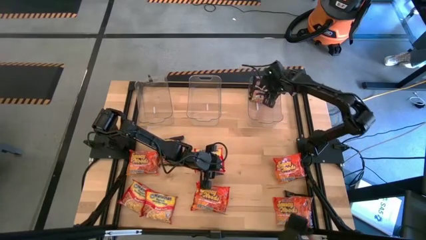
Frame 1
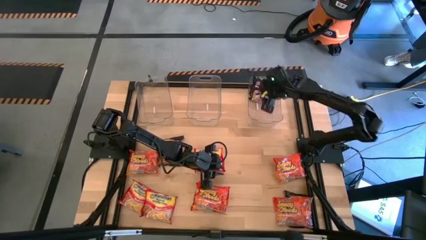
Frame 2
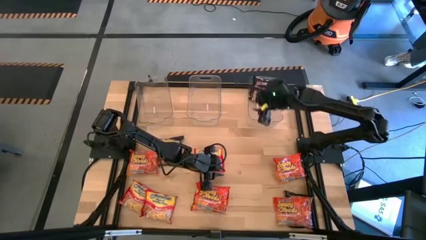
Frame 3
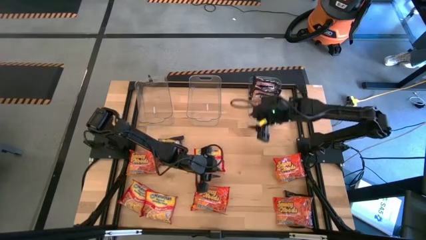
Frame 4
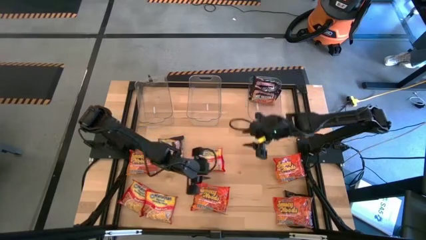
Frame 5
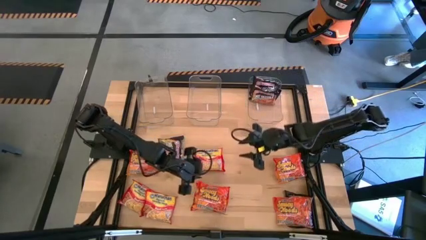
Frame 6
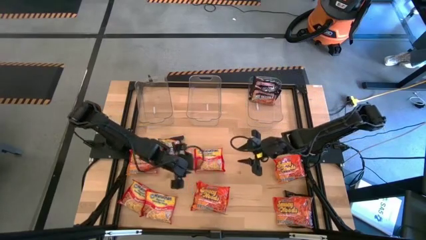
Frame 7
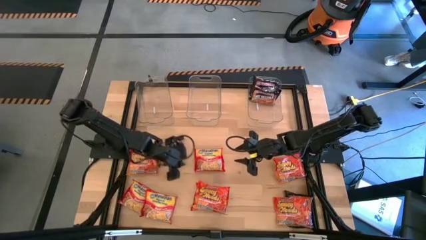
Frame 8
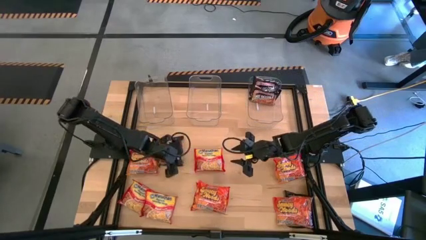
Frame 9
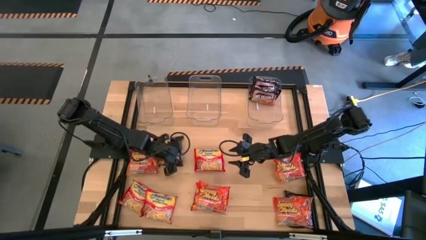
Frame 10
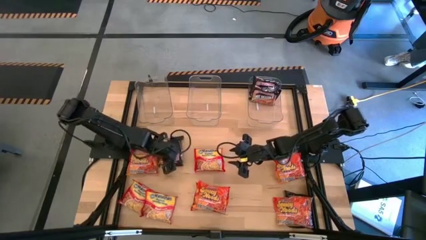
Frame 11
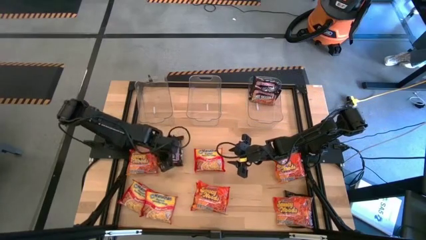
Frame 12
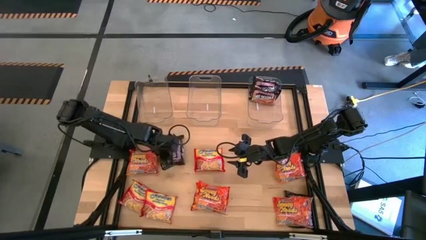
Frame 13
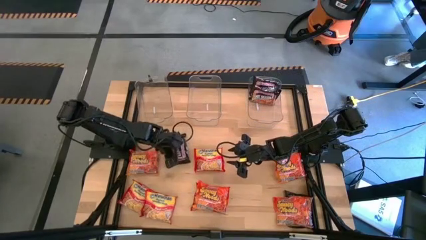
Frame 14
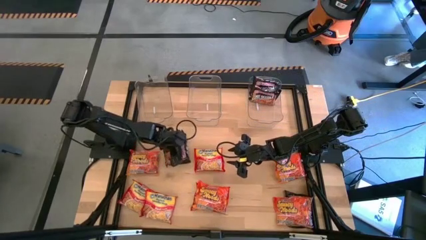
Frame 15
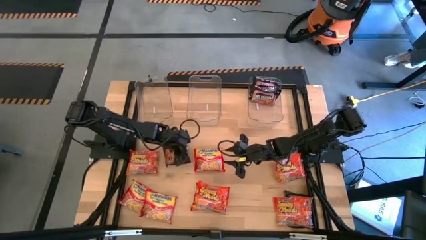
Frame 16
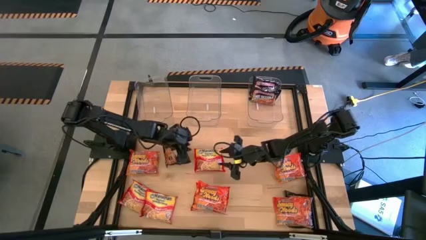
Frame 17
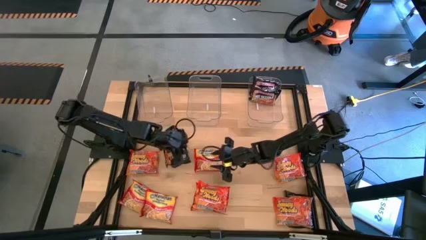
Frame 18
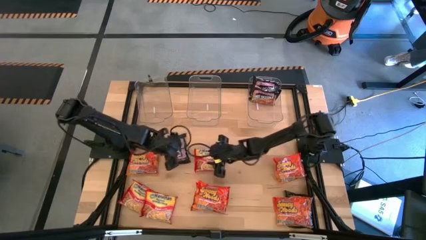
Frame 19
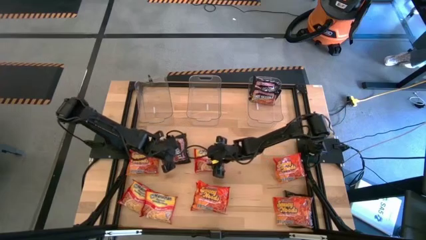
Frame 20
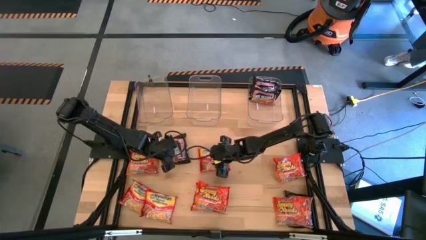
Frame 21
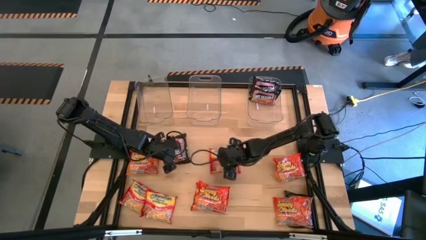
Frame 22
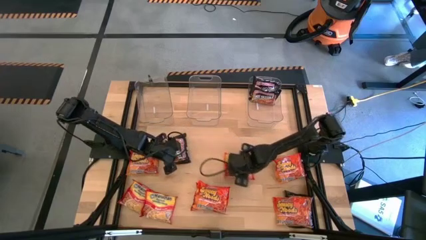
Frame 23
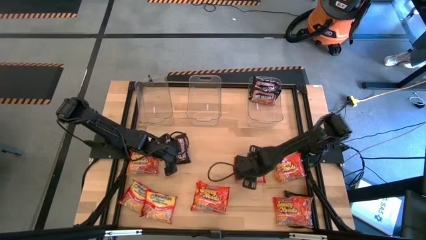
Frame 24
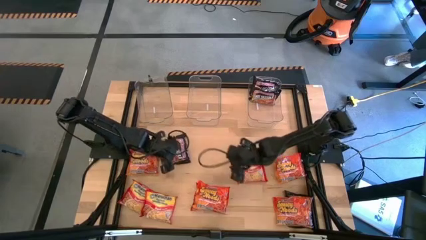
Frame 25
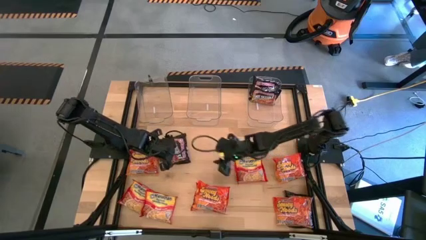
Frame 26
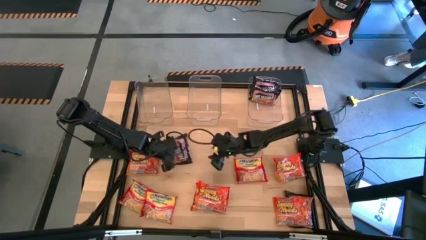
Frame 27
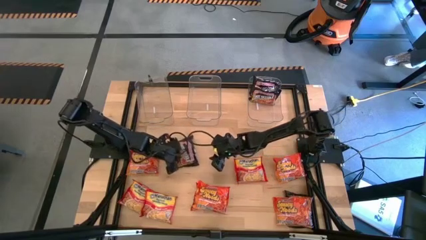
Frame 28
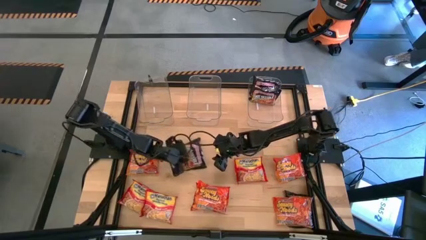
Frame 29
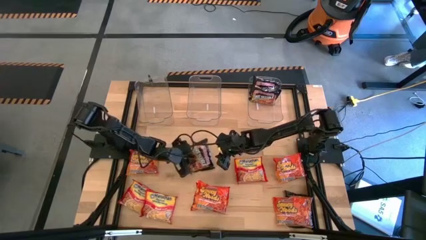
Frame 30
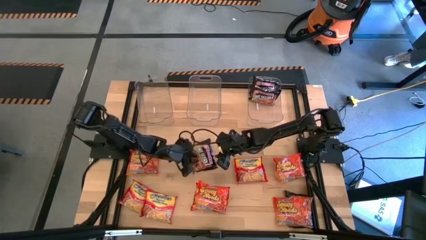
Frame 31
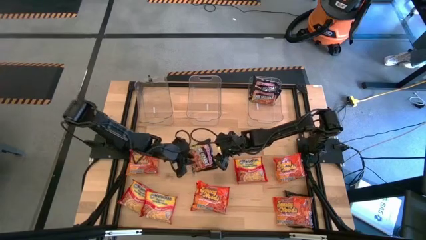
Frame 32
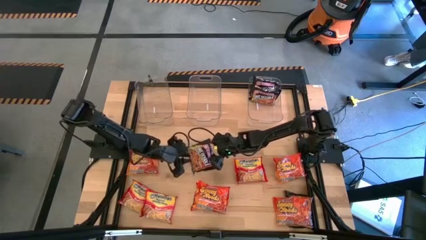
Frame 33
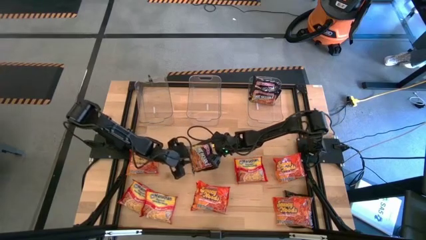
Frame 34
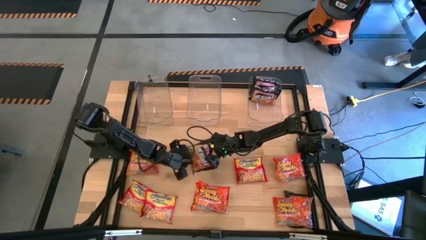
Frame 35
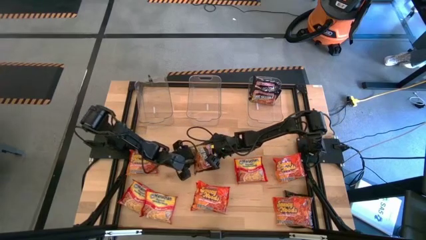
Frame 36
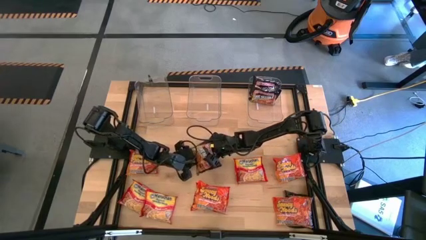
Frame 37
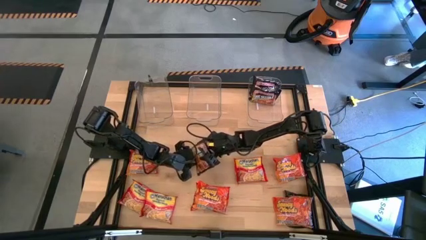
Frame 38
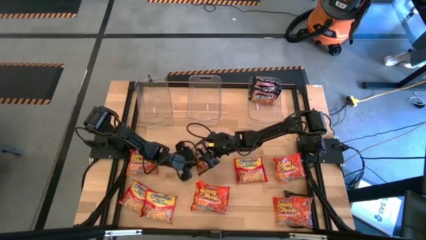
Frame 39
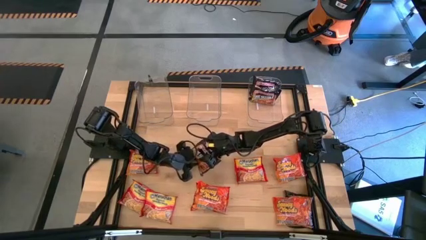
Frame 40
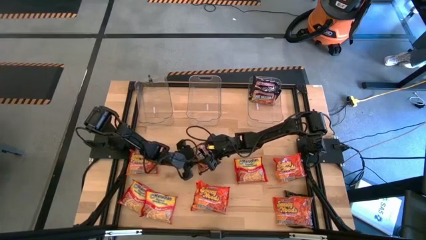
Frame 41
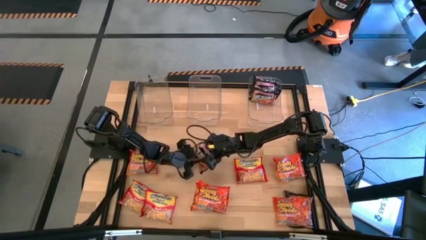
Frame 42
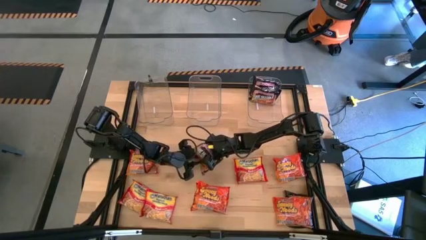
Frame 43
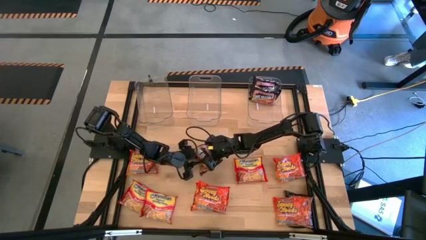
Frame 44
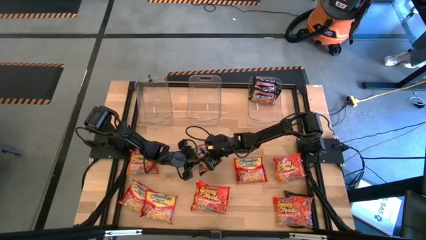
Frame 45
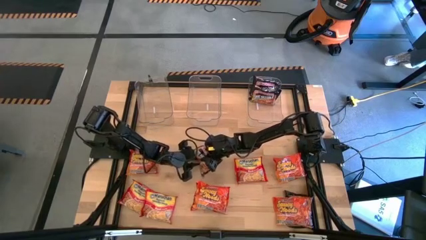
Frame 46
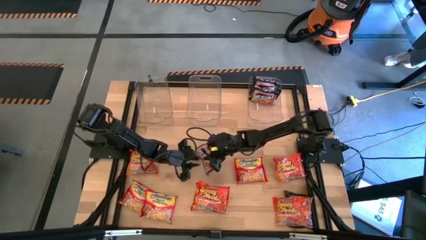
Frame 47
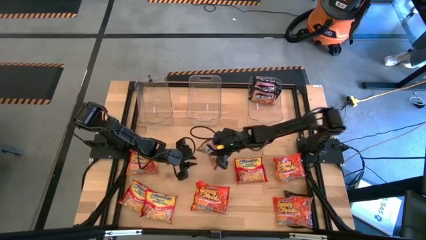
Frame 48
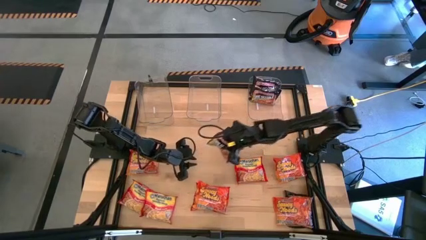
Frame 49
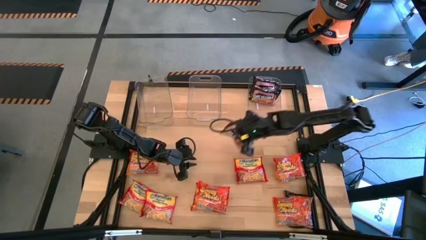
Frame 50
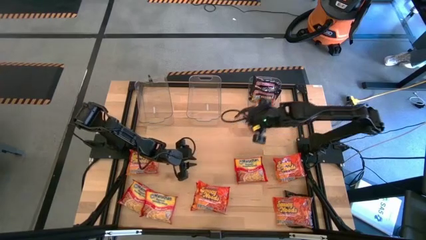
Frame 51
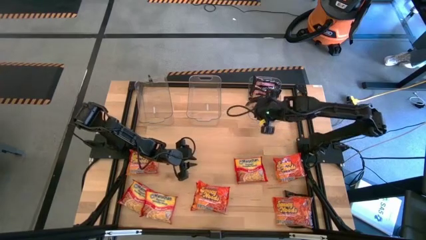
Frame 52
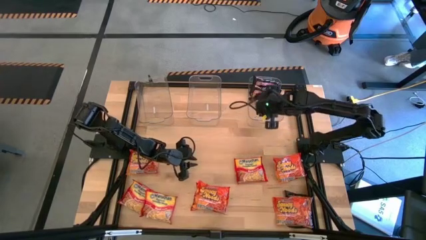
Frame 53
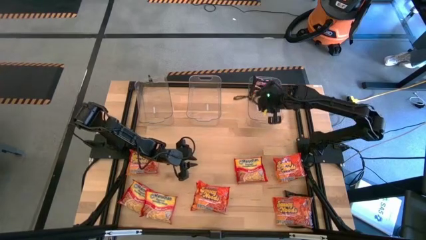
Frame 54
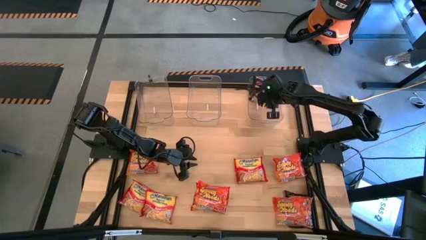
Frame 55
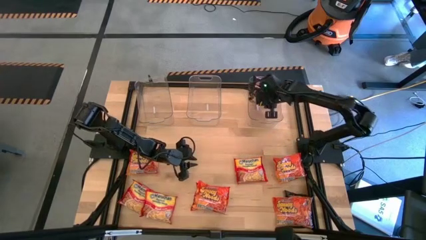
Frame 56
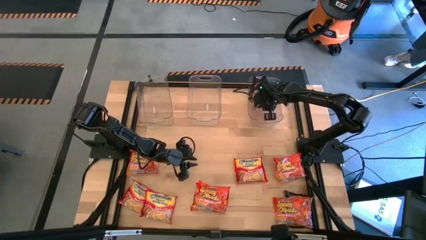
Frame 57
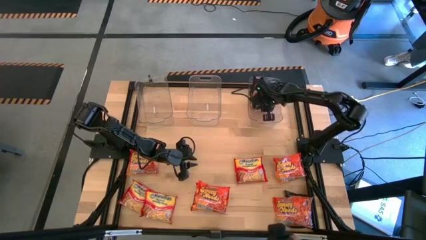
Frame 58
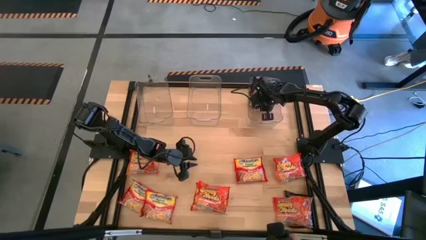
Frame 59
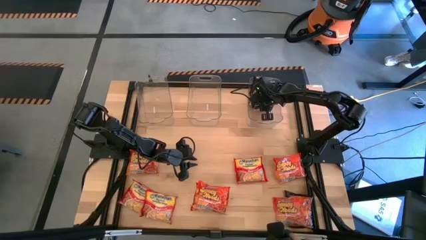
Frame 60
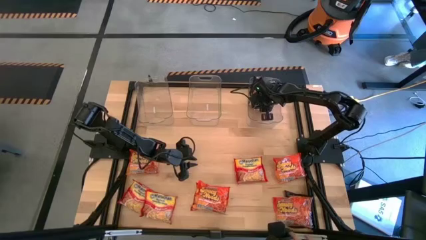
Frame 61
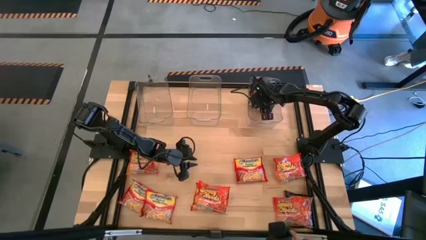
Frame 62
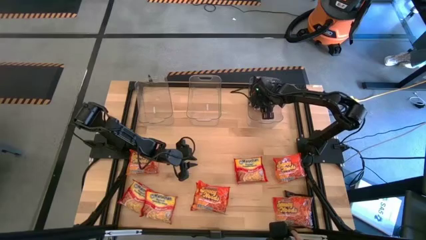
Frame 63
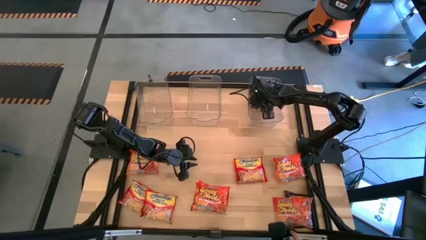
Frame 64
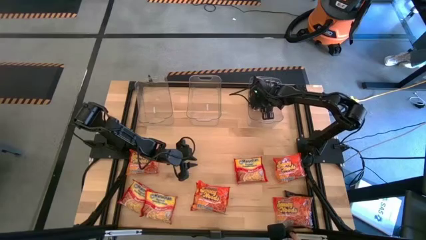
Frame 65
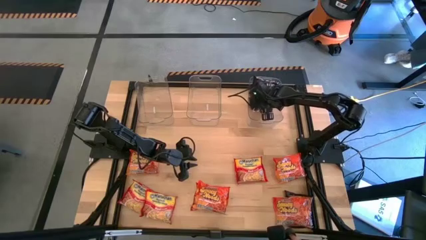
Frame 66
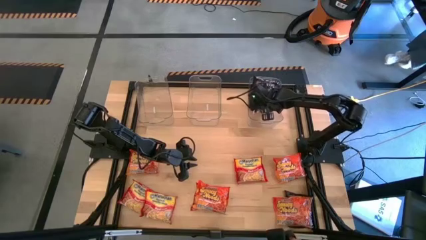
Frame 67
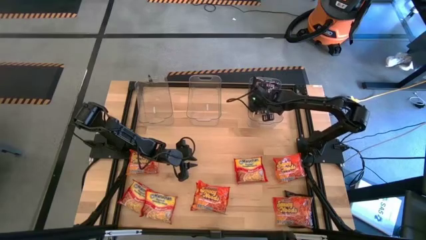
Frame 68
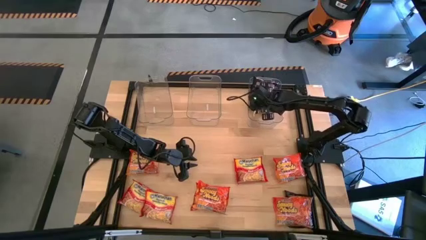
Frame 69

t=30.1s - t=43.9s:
Task: Sort Maruchan noodles
Put the black noodle pack into the right transparent bin

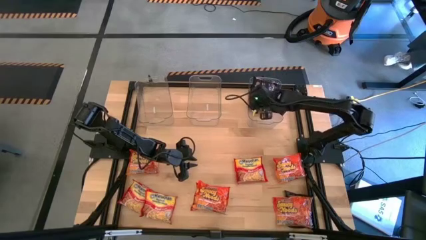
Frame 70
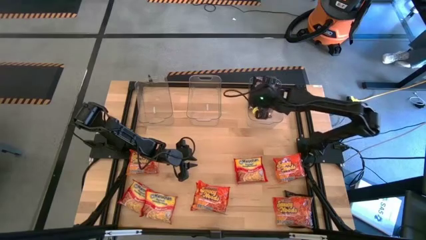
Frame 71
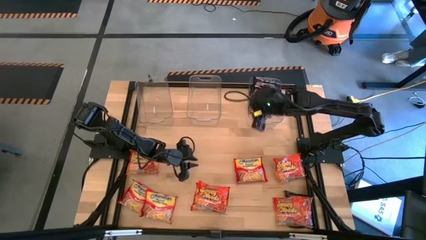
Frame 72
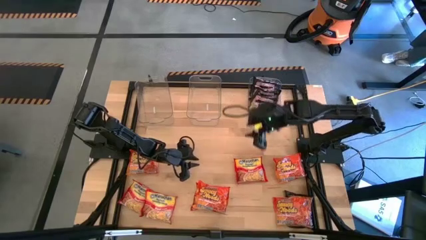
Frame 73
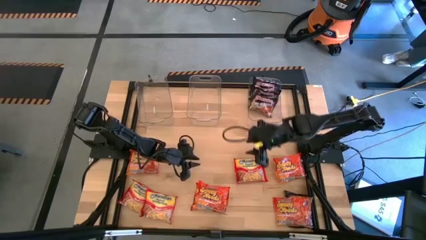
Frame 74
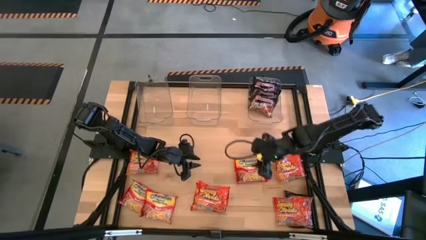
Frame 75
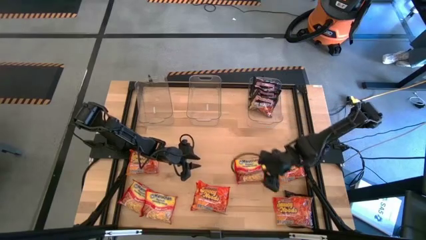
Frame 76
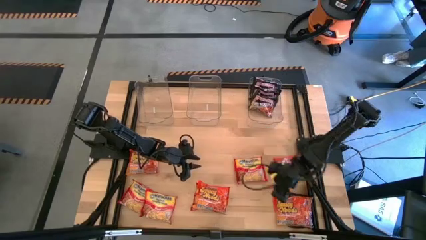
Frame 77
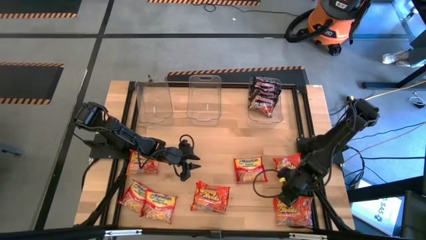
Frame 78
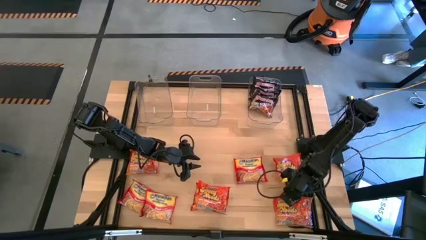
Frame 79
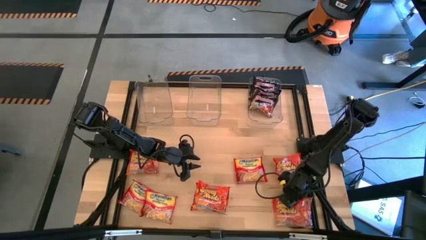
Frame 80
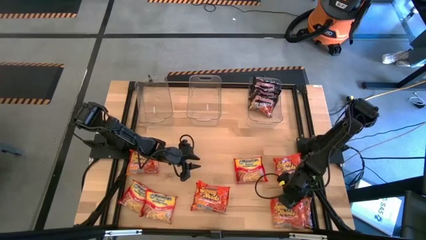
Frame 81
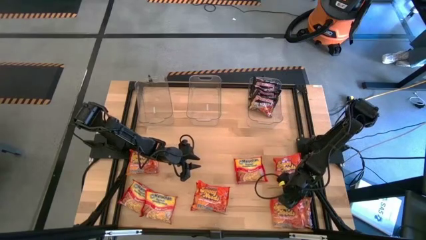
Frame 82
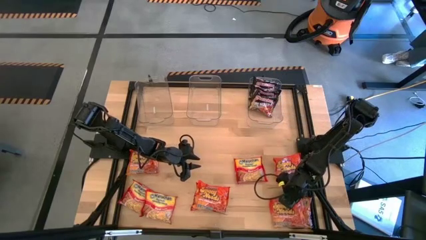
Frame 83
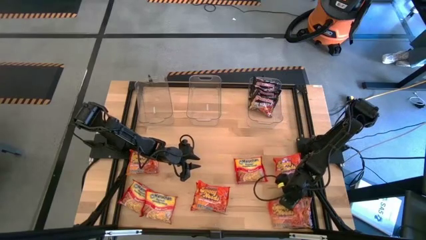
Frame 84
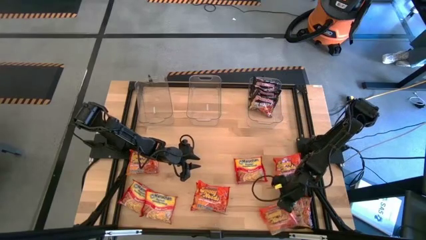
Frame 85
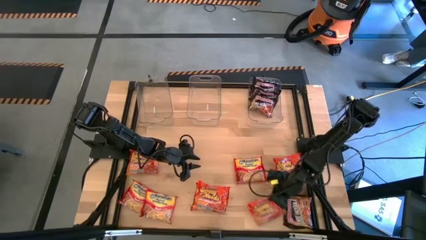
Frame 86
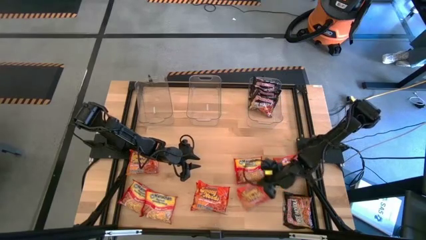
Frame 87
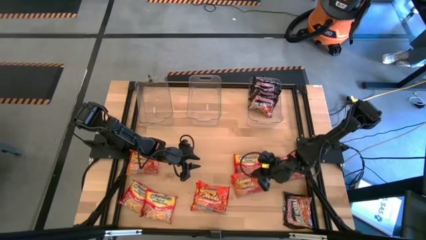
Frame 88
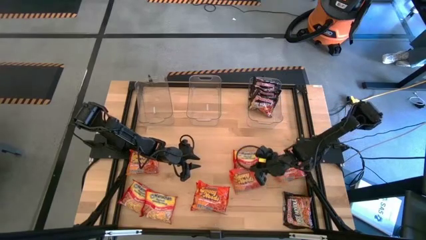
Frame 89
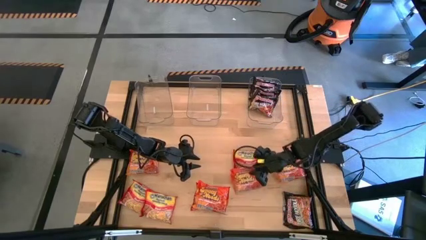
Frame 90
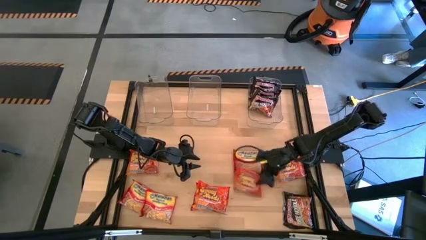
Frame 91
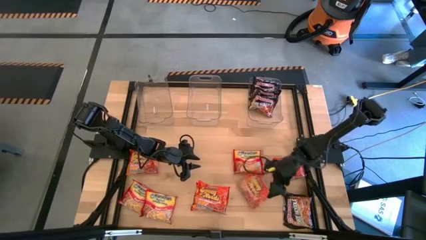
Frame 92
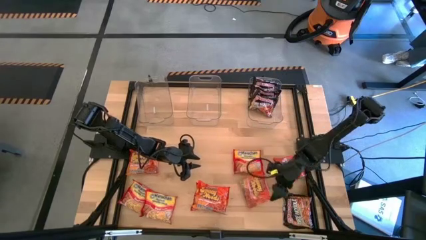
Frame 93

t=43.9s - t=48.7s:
Adjust the orange noodle pack
